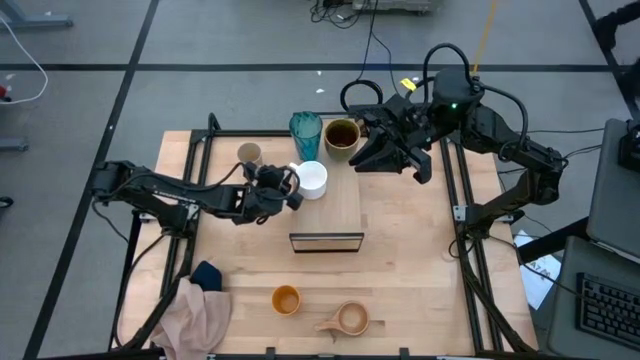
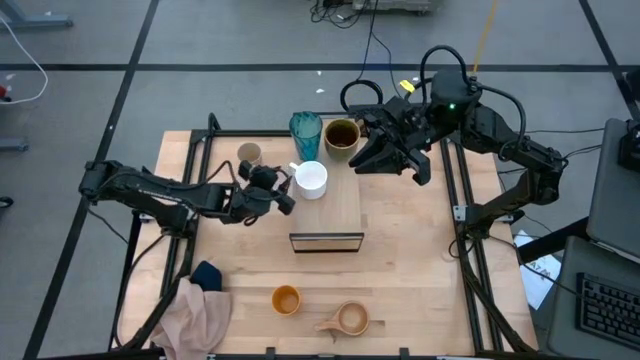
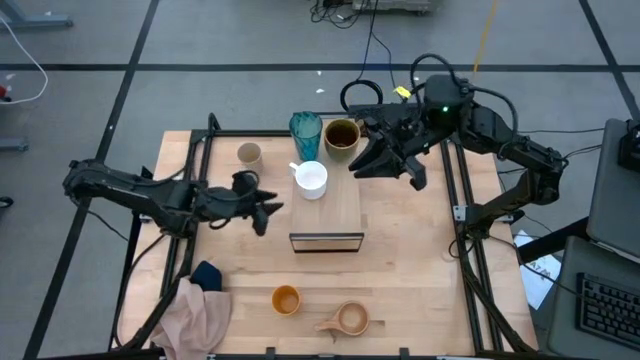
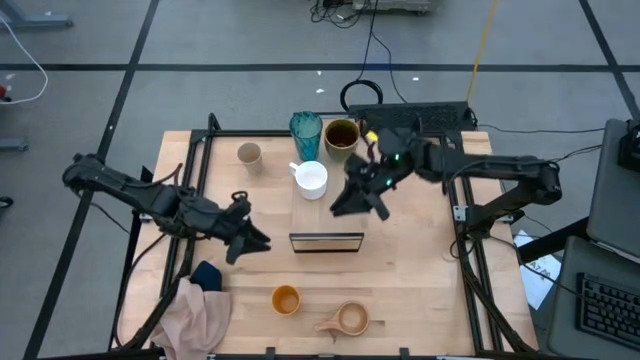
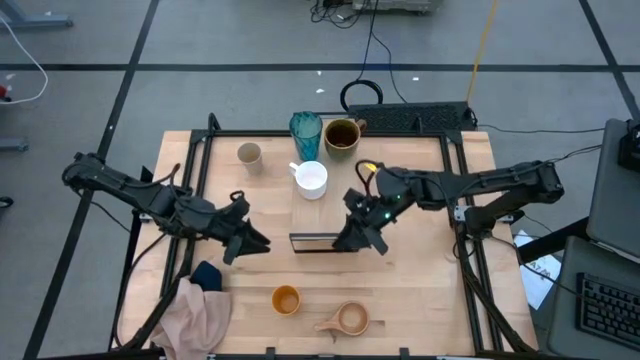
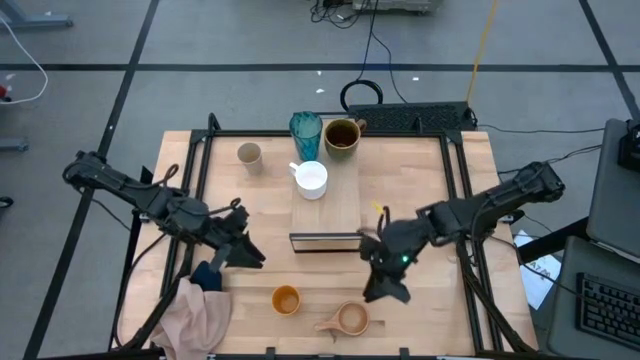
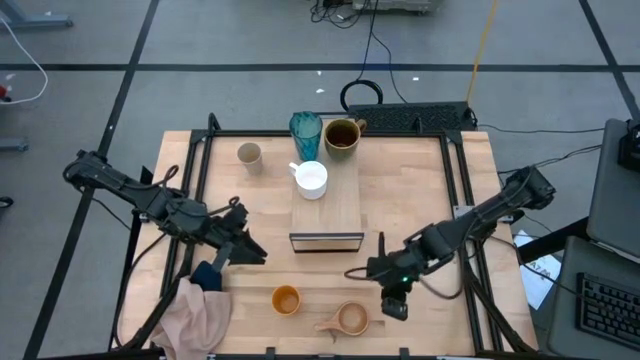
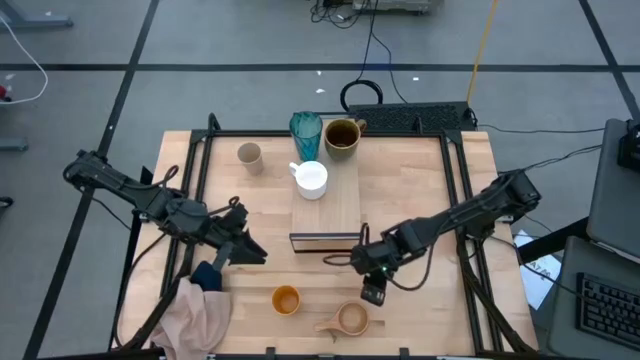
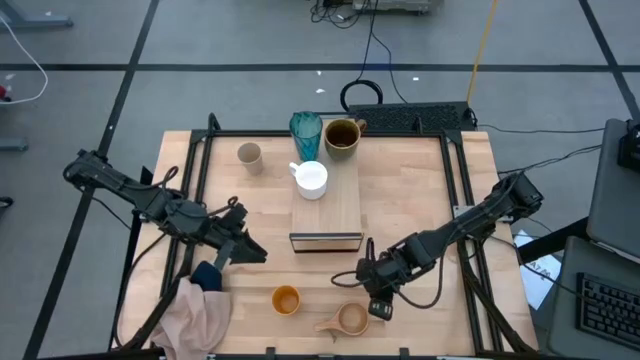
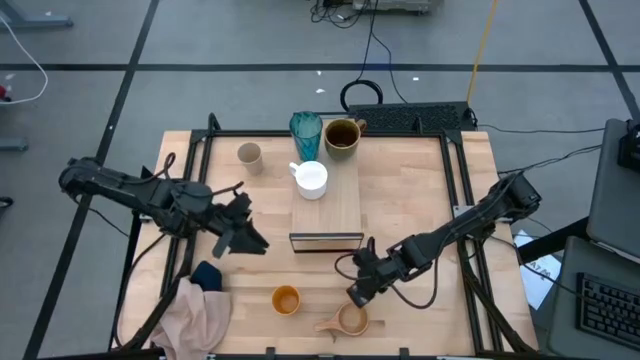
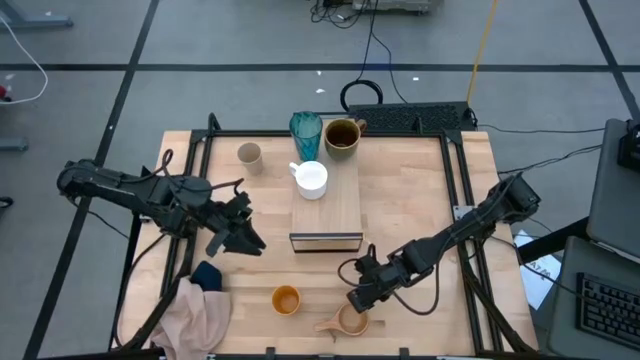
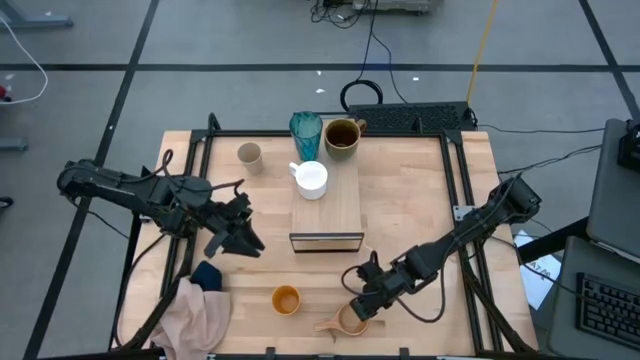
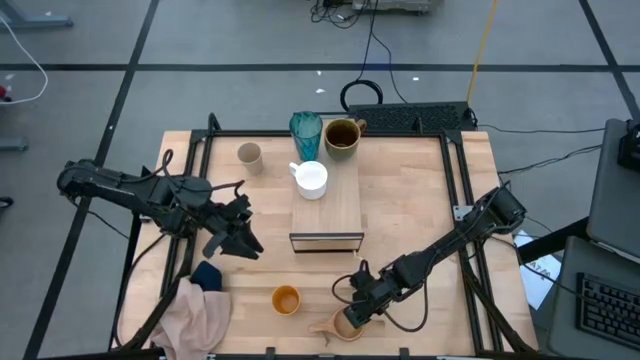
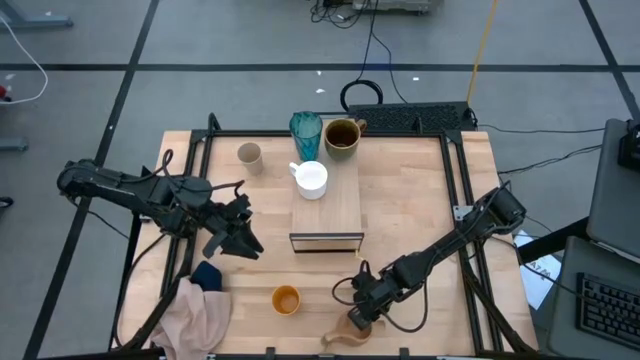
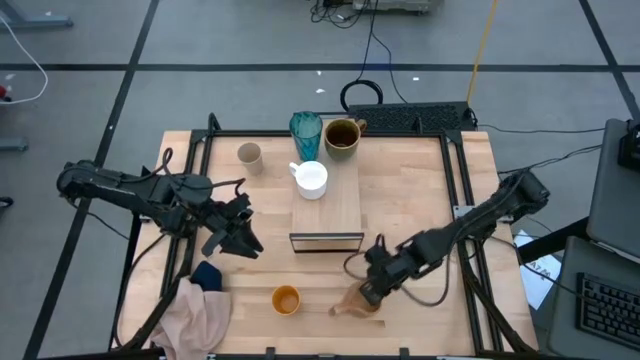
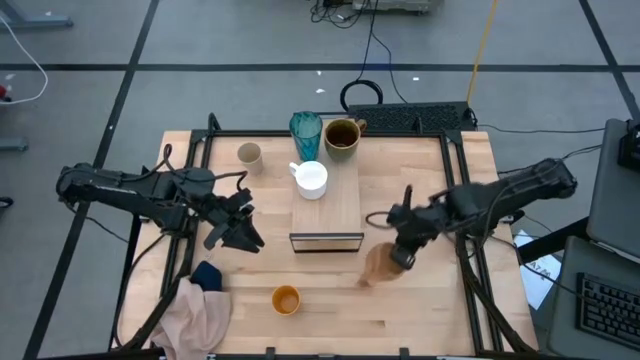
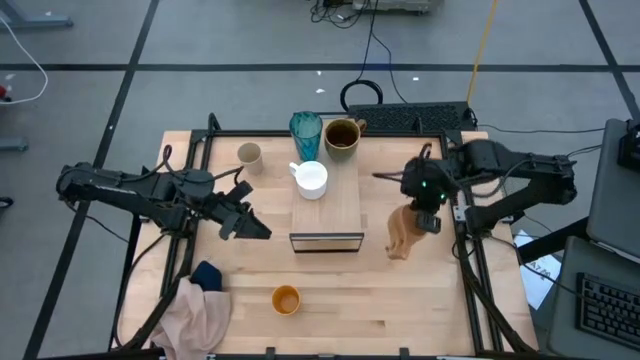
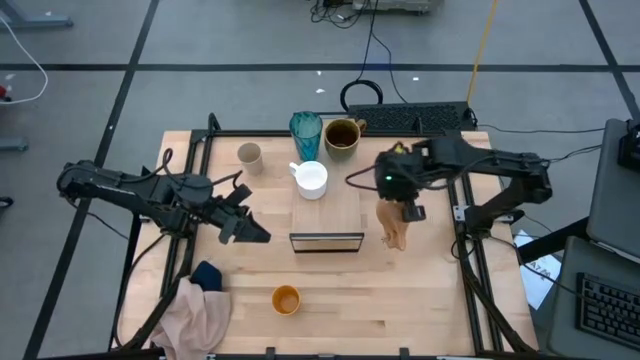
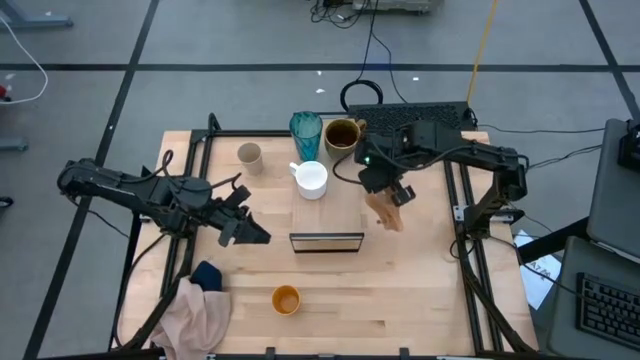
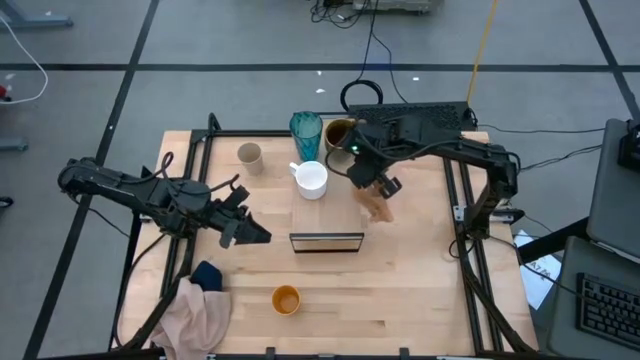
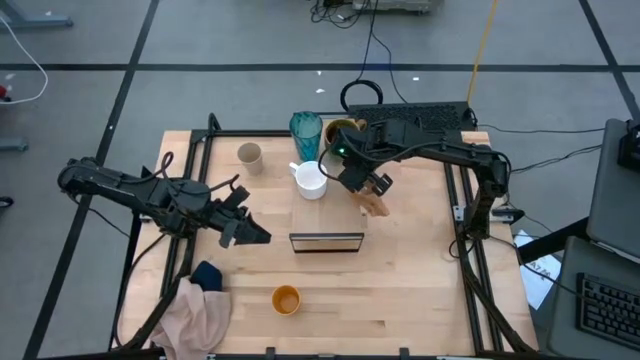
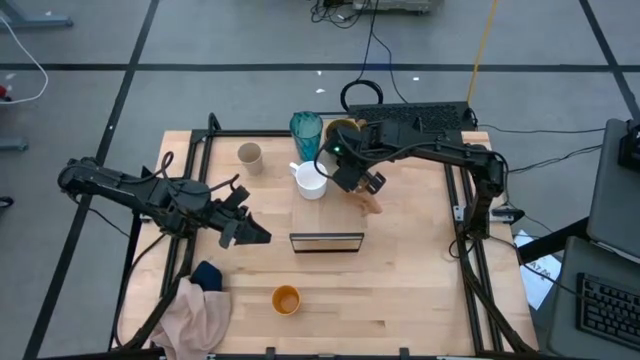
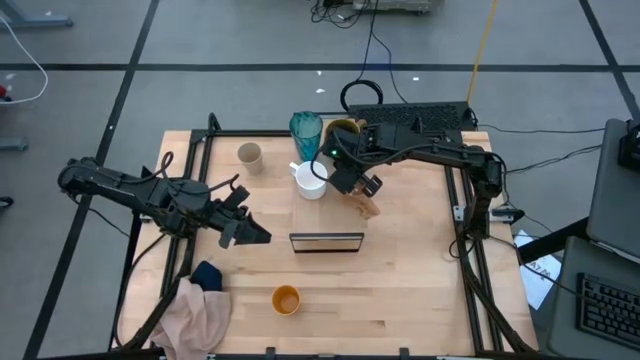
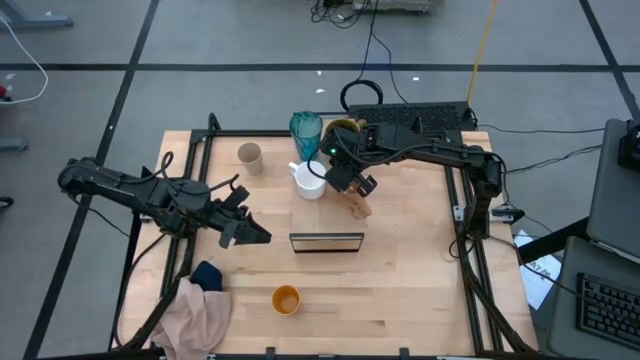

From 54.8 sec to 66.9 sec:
Task: Stack small to large cups/mugs on shelf
Put the brown mug on the shelf

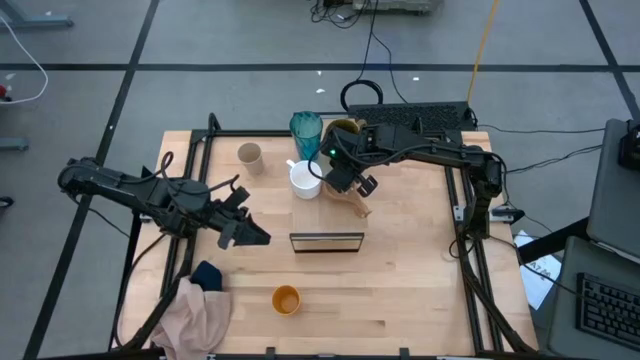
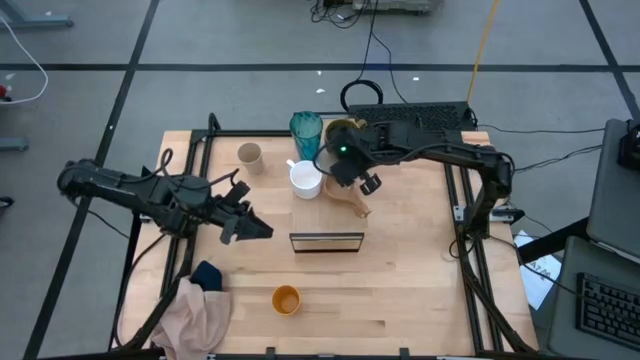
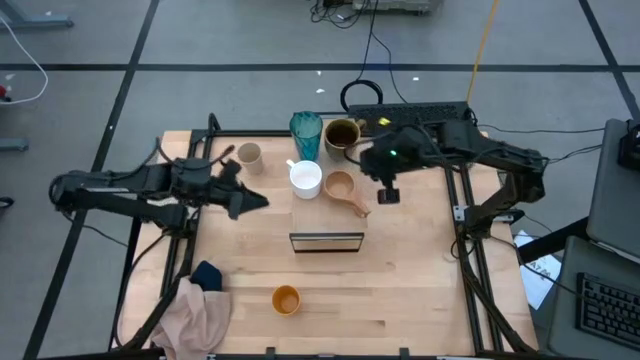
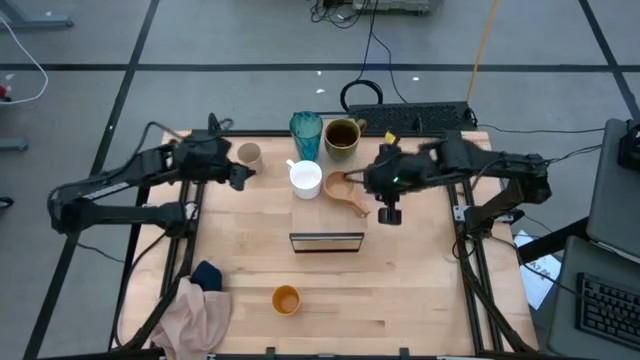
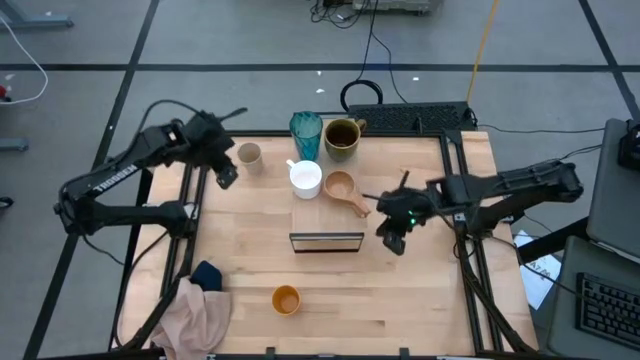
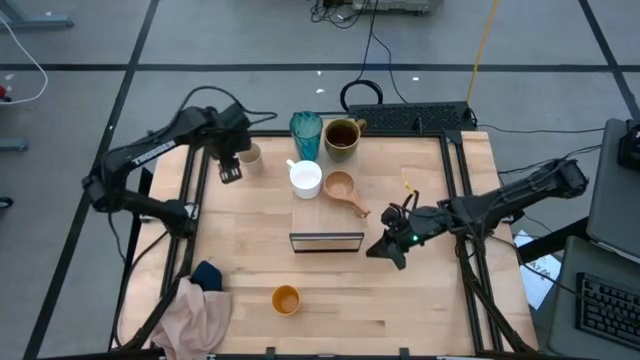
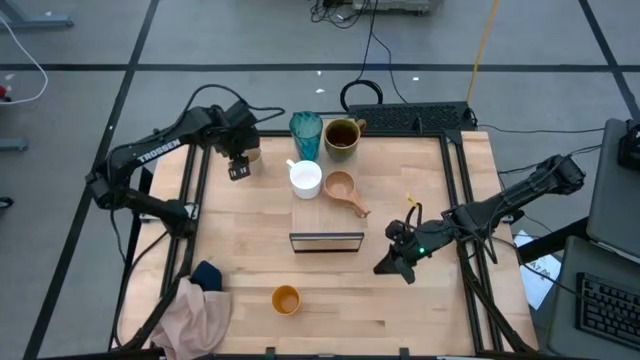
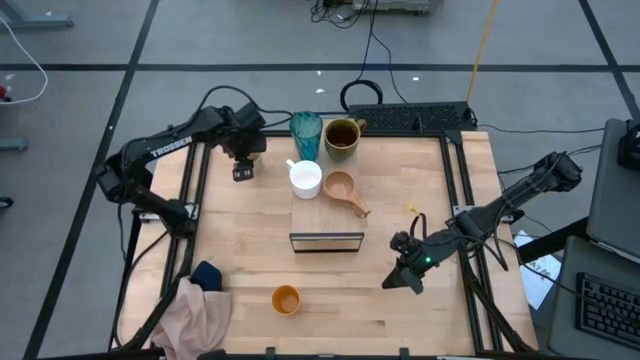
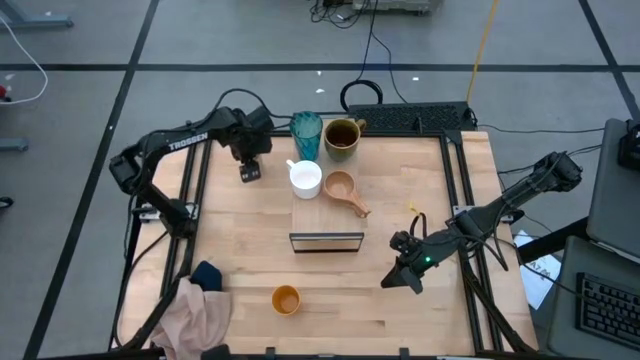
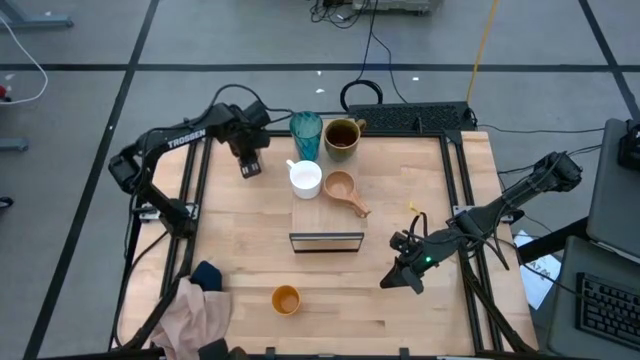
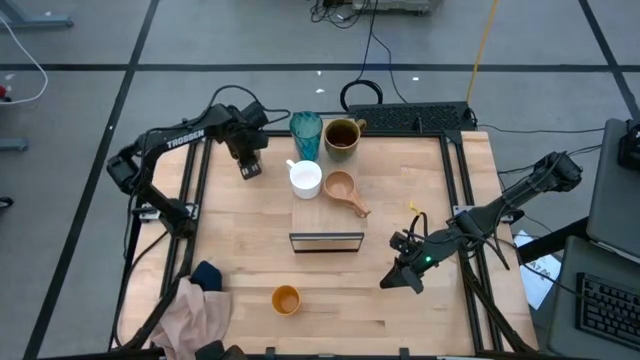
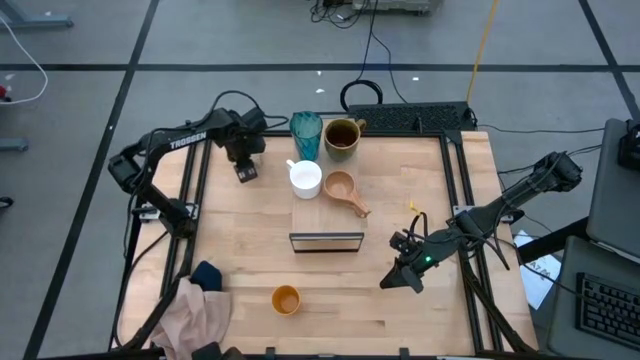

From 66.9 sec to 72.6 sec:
Put the white cup on the shelf

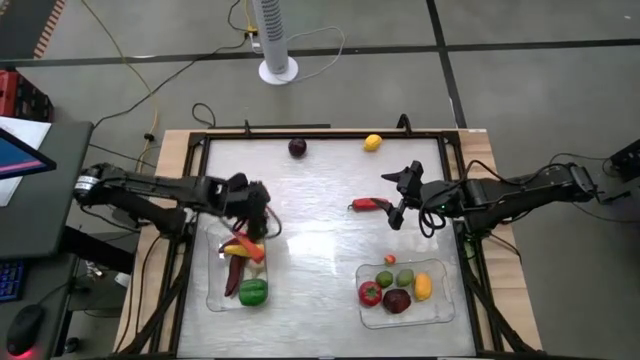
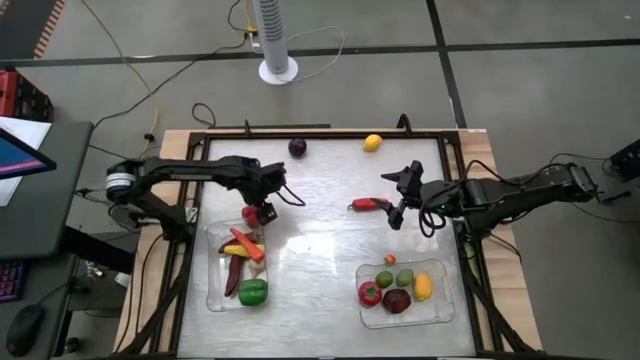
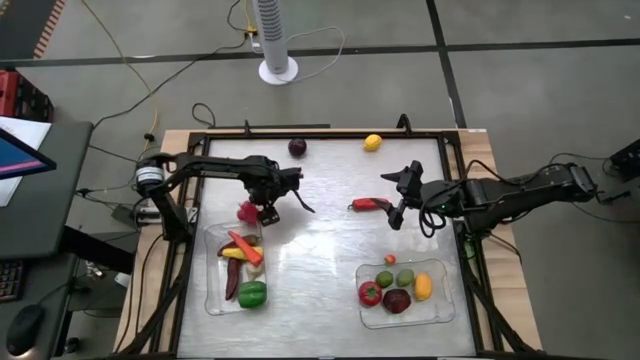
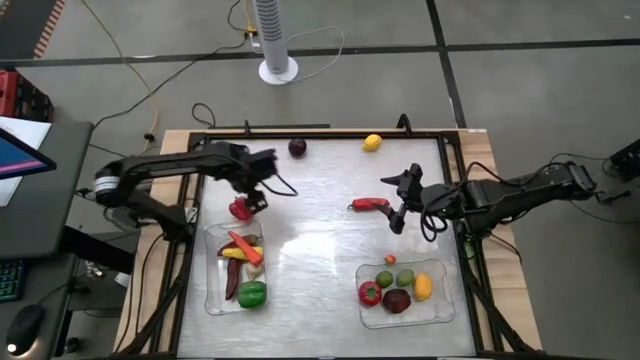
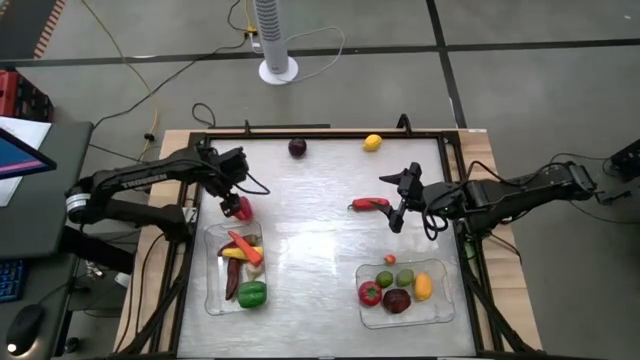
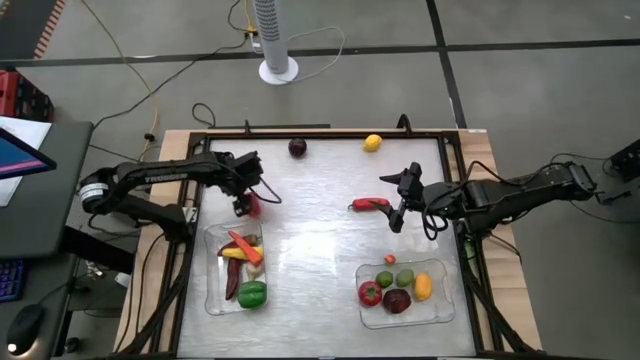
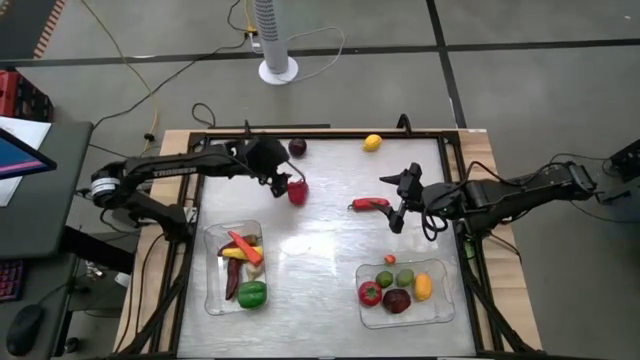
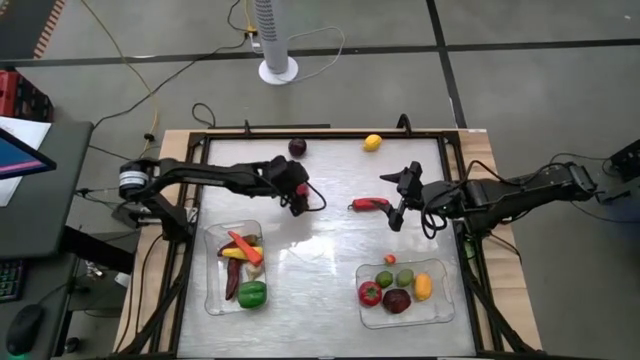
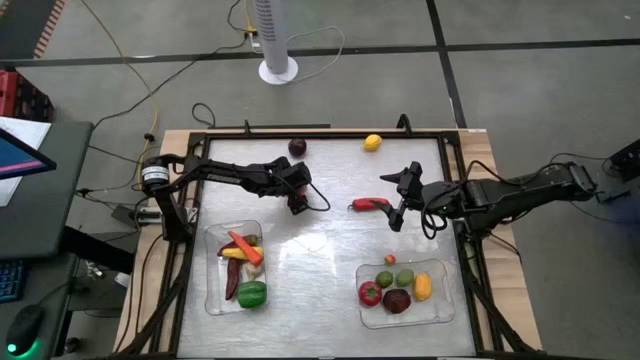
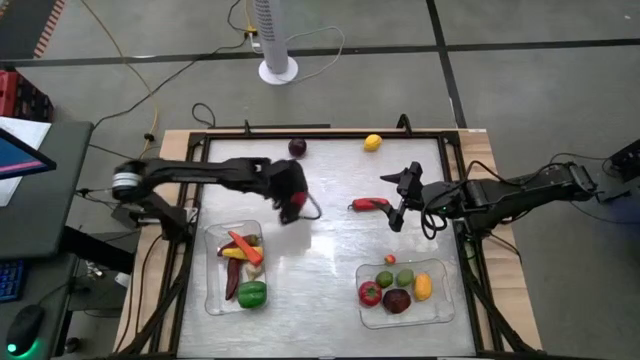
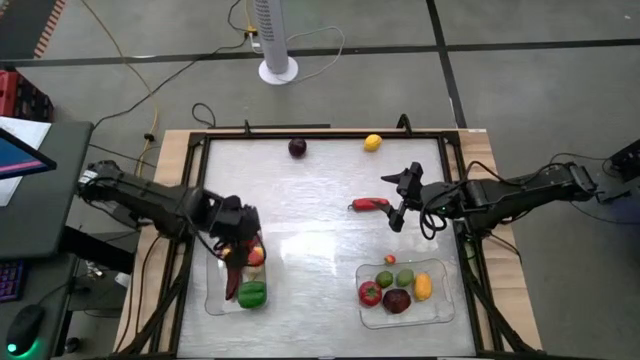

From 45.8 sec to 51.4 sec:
Task: Sort produce into baskets
Put the red bell pepper into the left transparent bin
